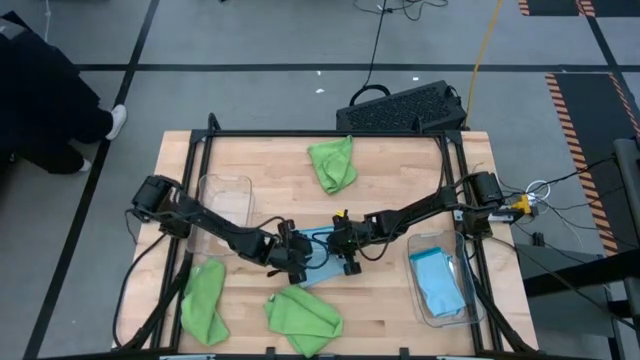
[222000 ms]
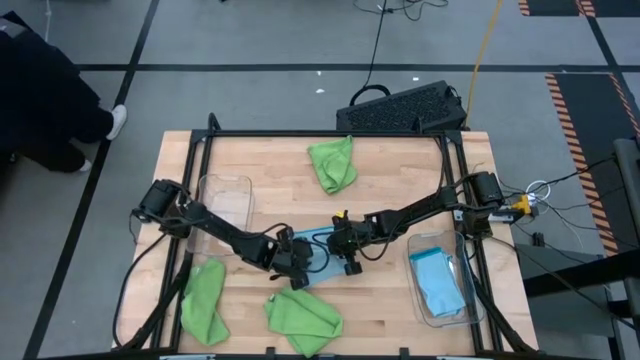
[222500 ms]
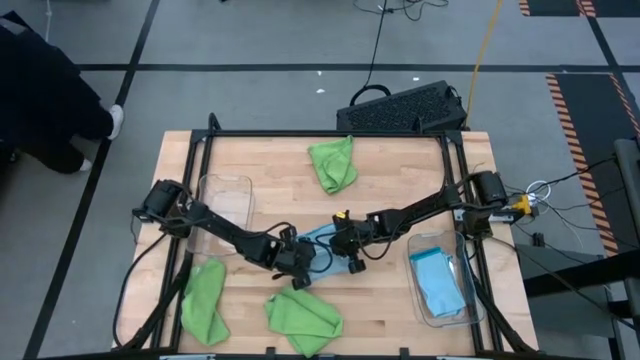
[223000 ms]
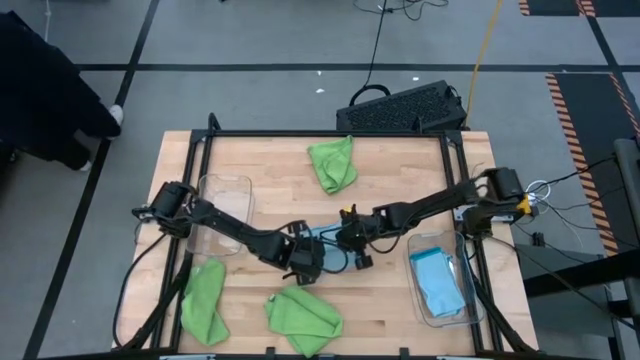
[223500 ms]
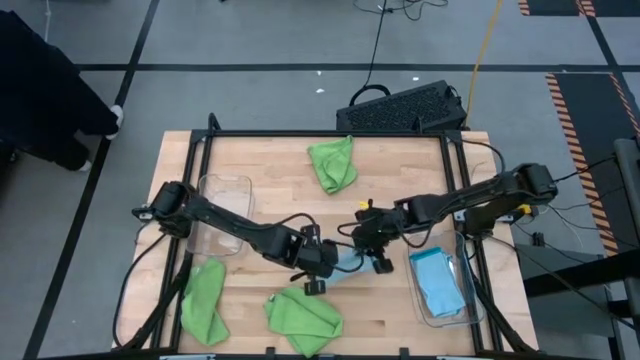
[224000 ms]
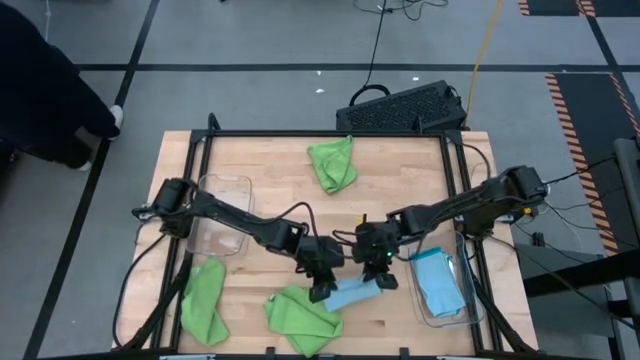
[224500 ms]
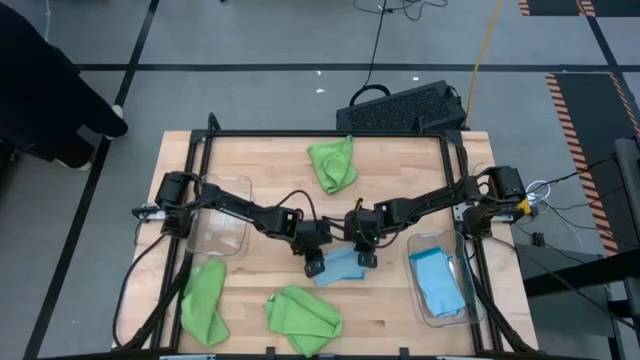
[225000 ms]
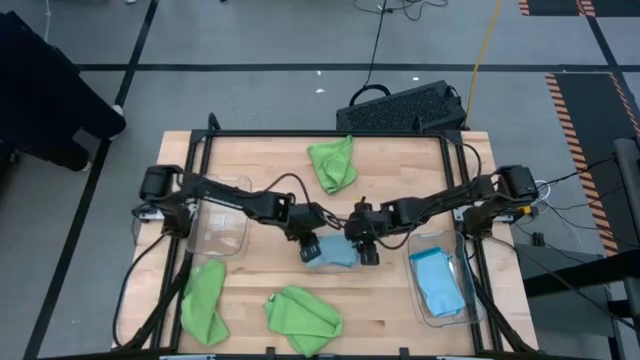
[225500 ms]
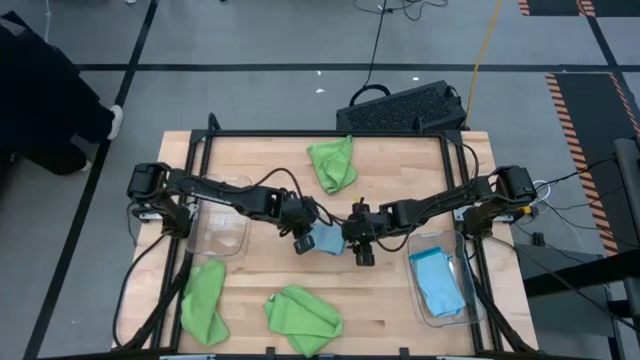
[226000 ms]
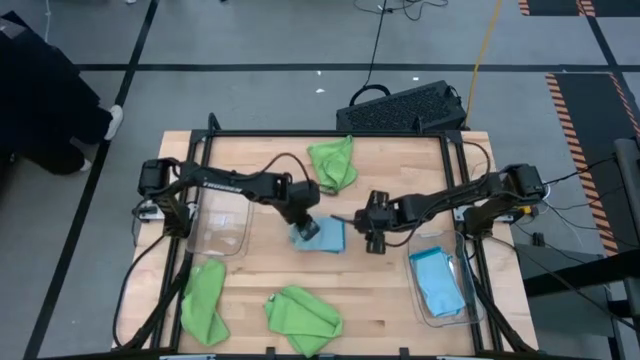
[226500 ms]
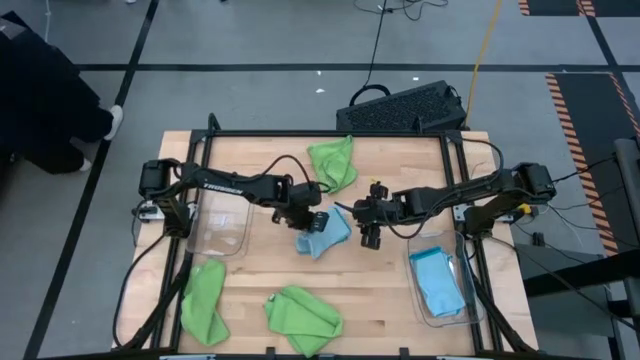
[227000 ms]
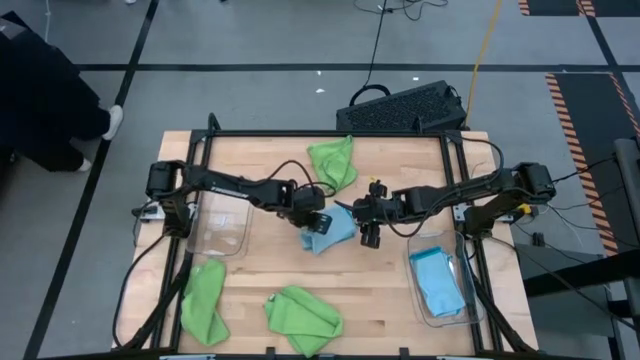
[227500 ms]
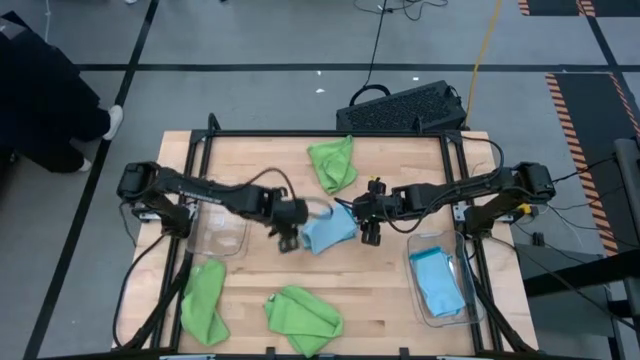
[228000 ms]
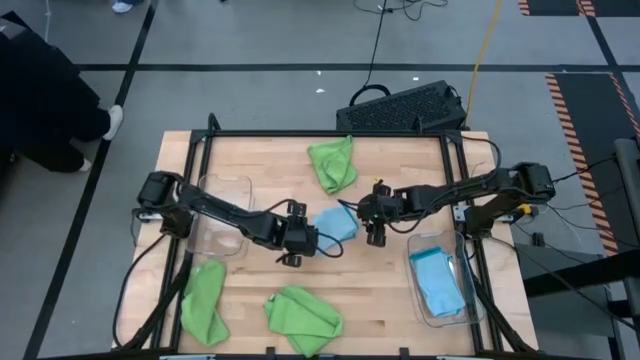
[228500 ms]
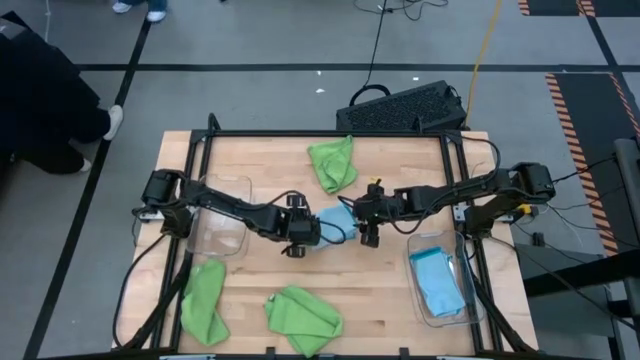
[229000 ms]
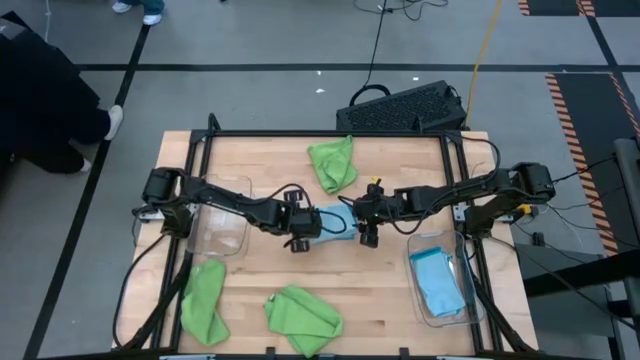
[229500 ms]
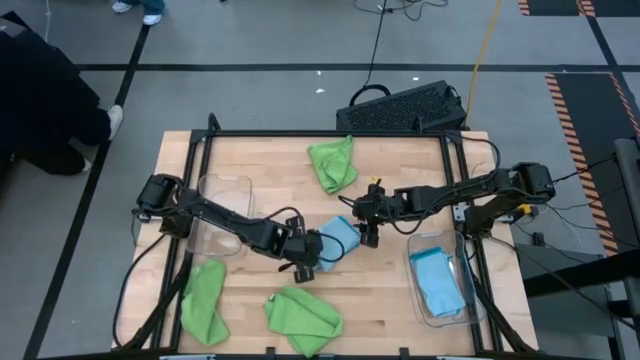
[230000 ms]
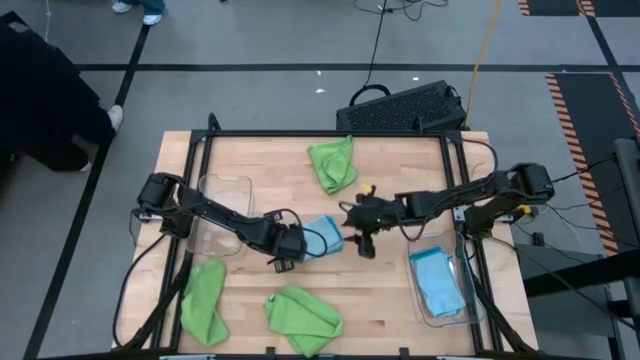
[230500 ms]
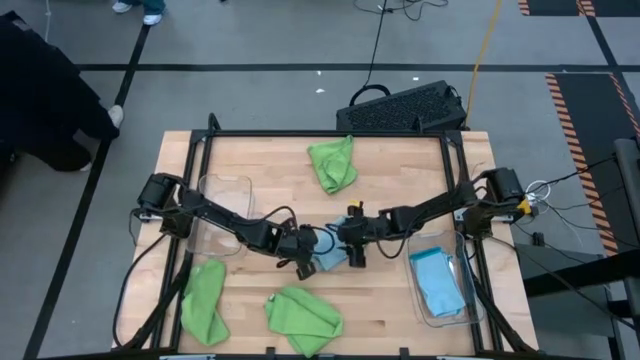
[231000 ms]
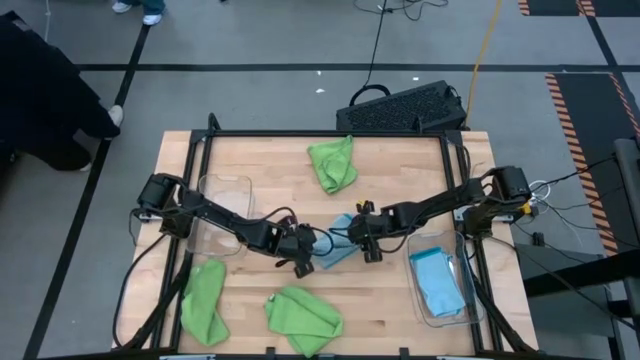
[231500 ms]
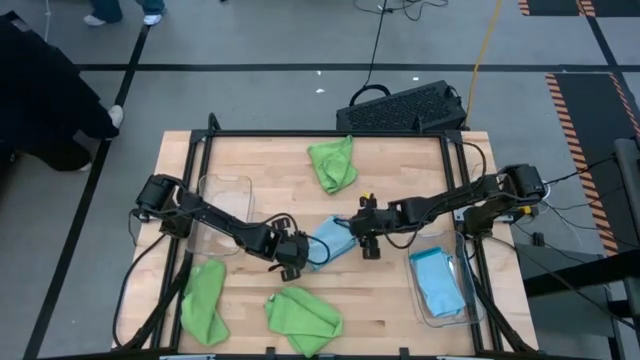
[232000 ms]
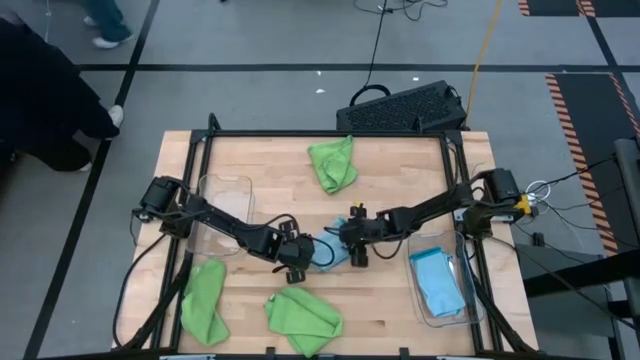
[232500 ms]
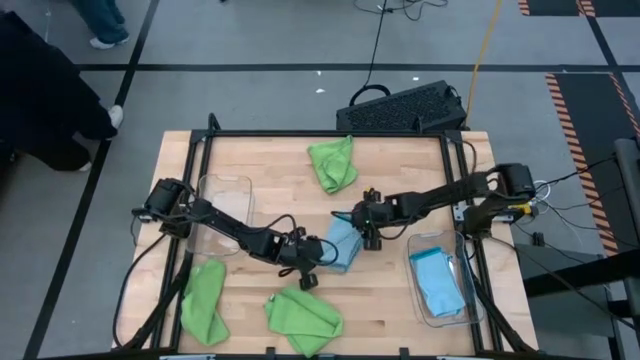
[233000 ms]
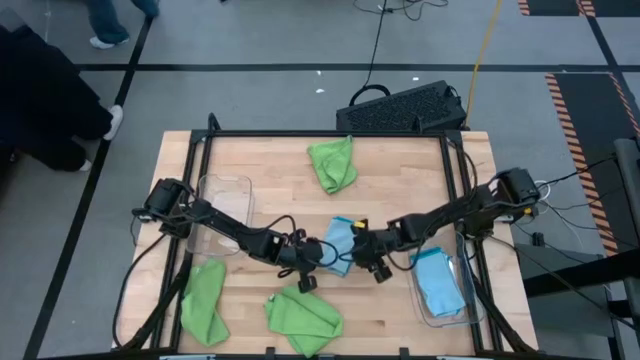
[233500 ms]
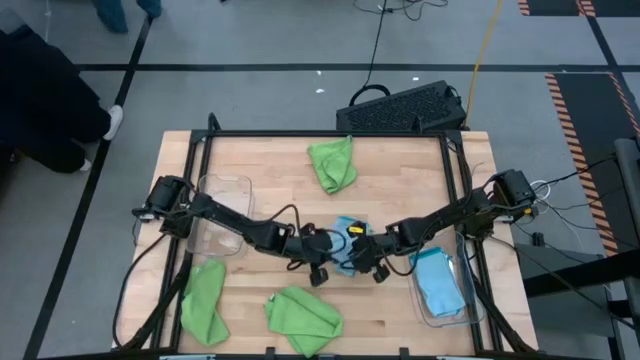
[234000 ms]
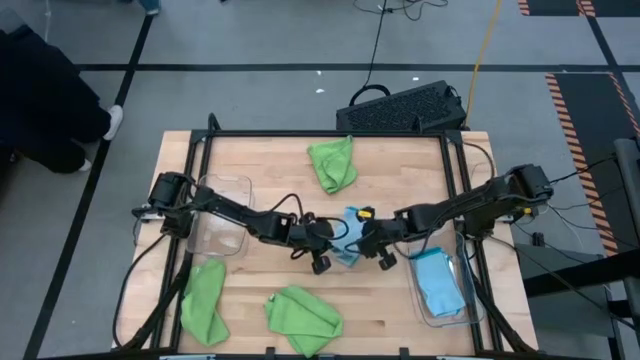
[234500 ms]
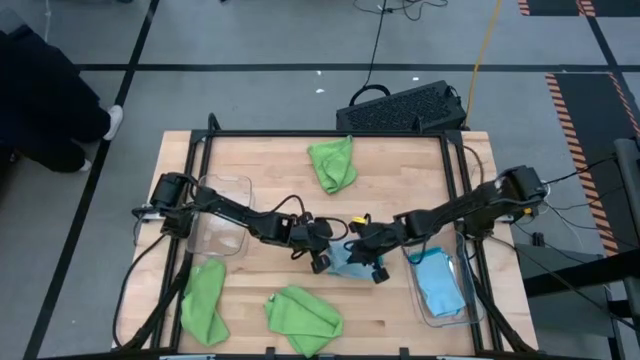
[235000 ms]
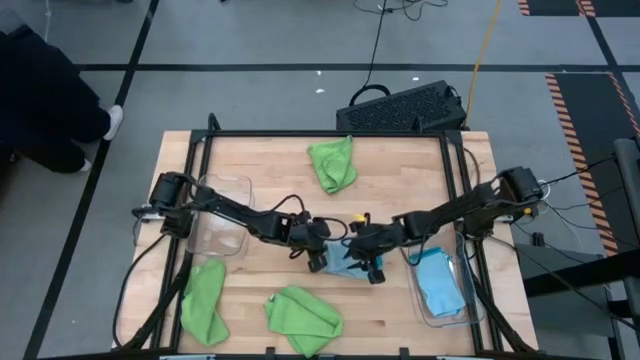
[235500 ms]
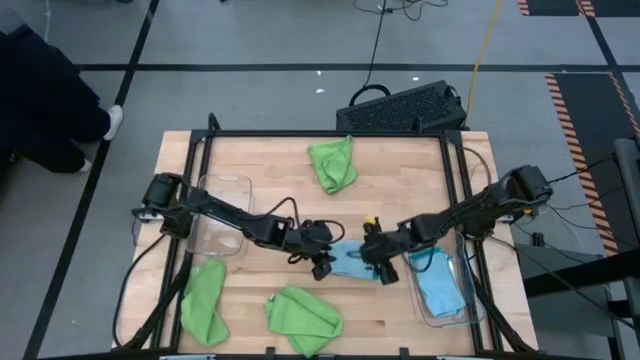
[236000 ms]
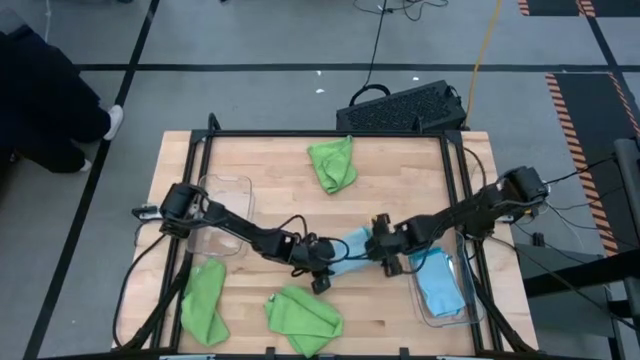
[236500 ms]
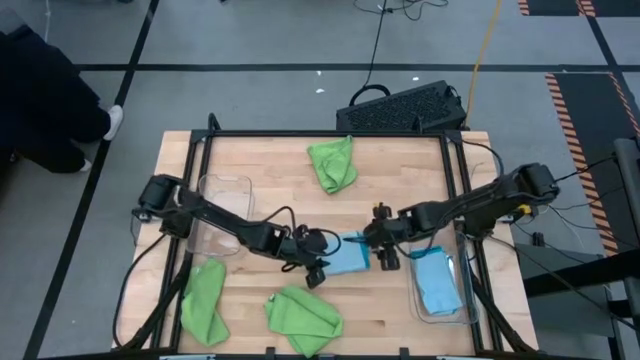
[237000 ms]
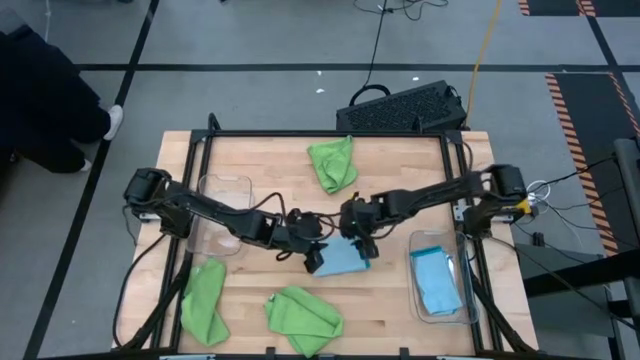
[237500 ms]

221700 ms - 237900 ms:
Task: Sort microfiber towel by color & place in baskets
Fold the blue microfiber towel

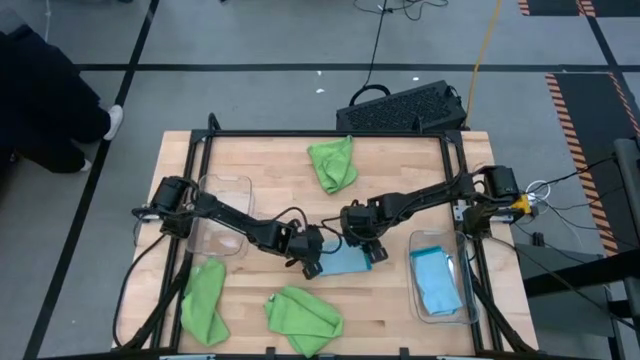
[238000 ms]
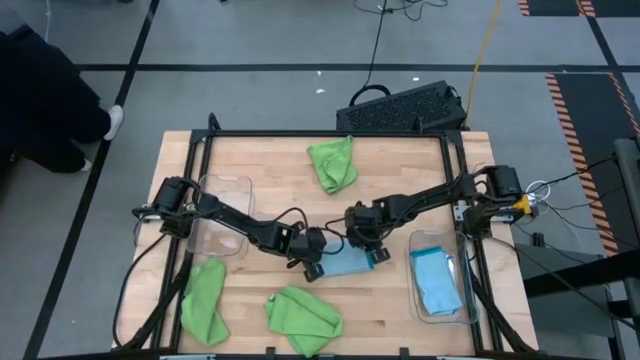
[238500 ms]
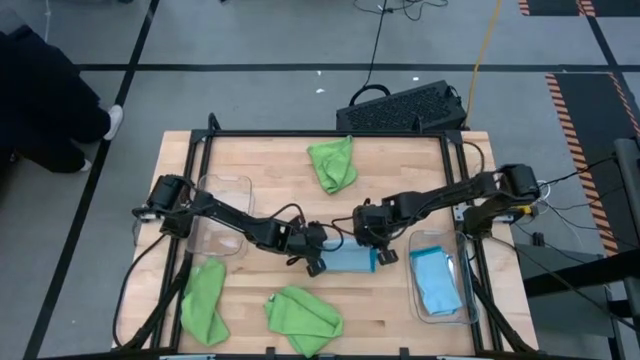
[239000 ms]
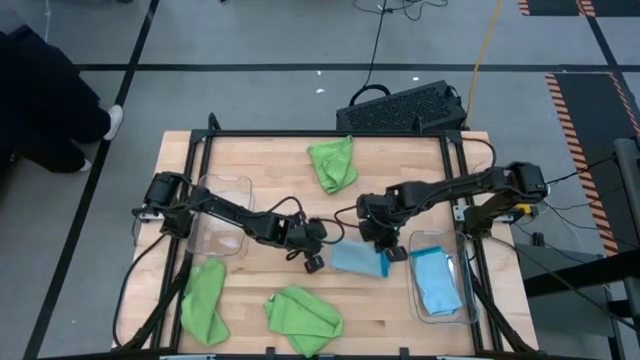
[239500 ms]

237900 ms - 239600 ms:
Fold the blue microfiber towel

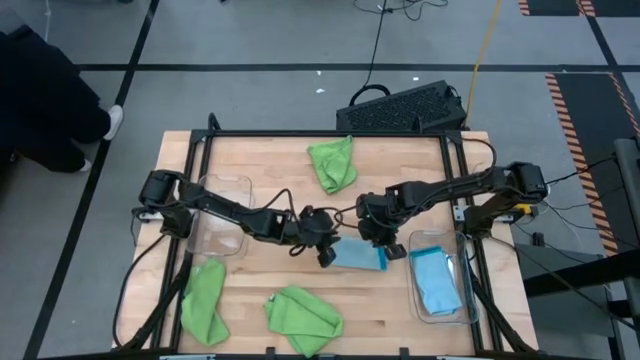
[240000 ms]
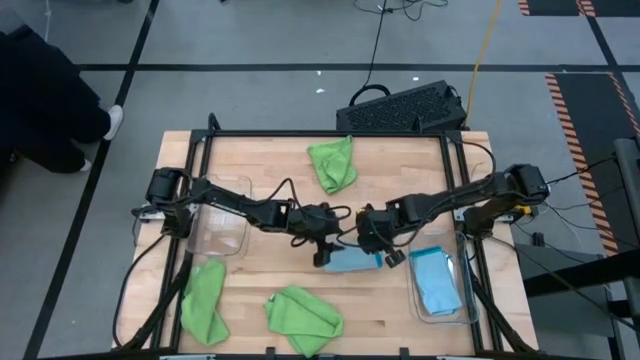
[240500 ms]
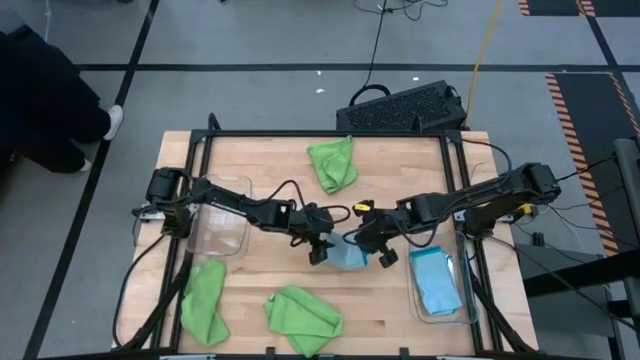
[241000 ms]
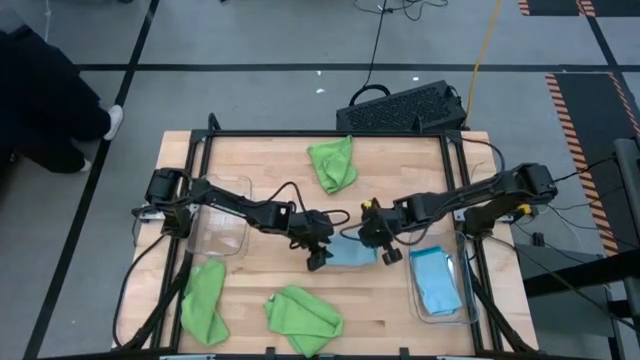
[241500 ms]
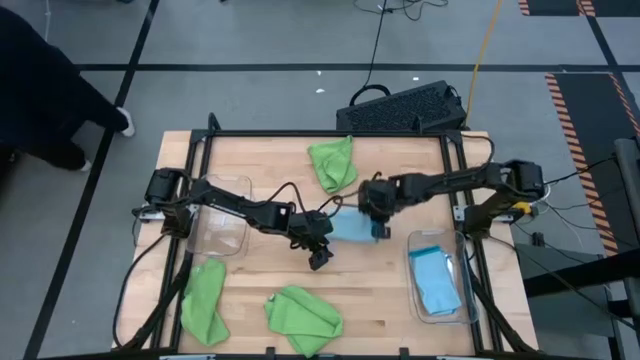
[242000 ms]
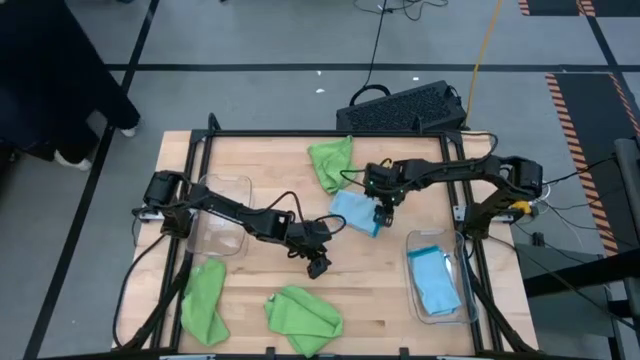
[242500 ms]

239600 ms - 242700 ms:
Fold the blue microfiber towel
